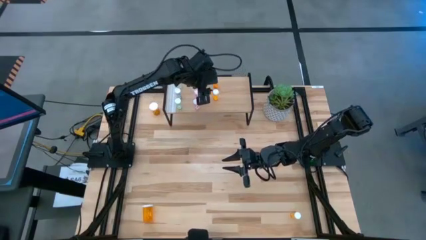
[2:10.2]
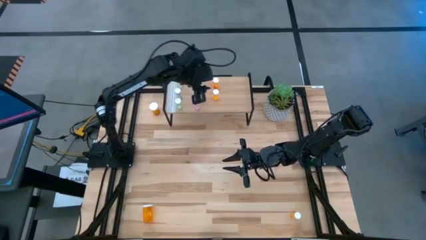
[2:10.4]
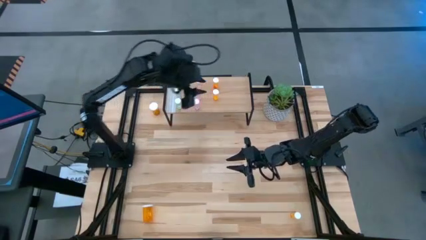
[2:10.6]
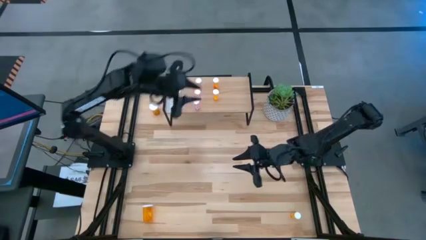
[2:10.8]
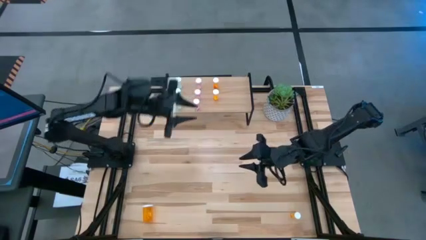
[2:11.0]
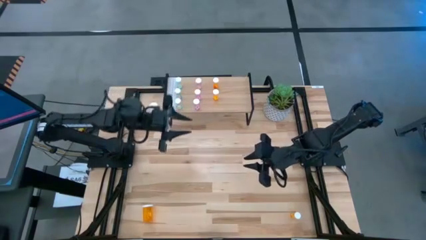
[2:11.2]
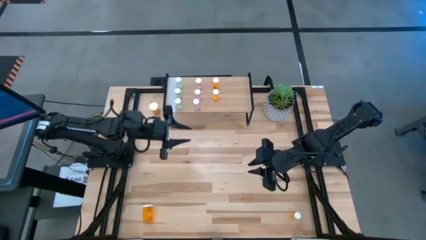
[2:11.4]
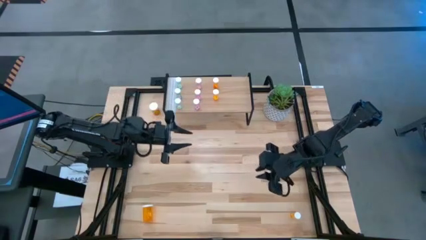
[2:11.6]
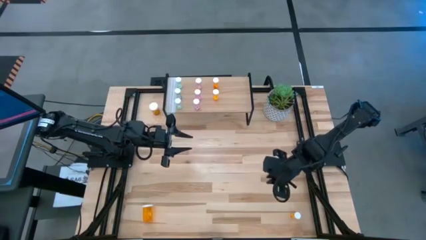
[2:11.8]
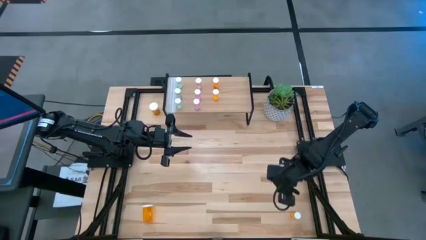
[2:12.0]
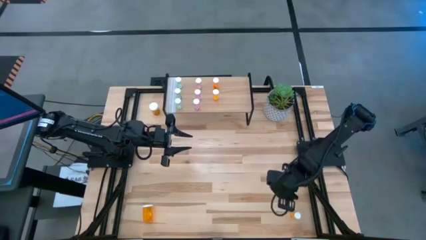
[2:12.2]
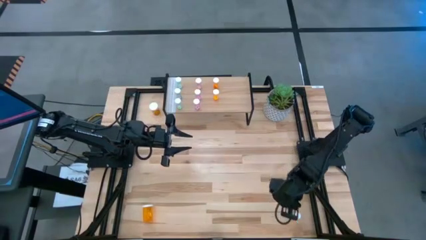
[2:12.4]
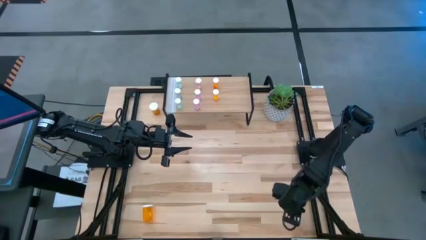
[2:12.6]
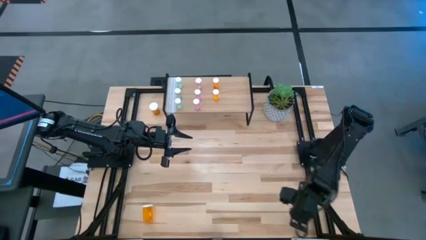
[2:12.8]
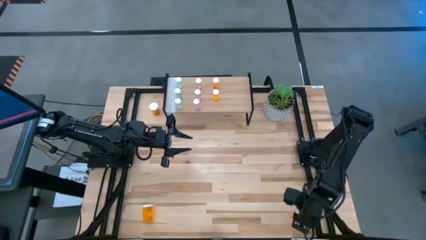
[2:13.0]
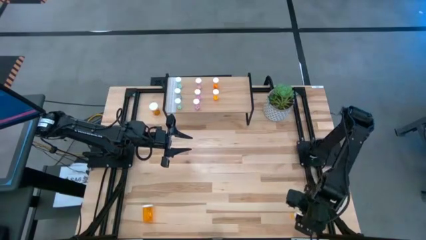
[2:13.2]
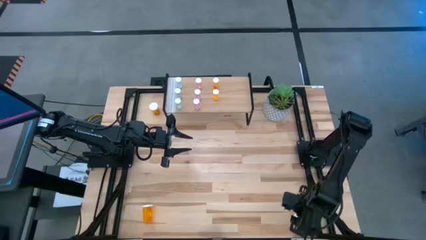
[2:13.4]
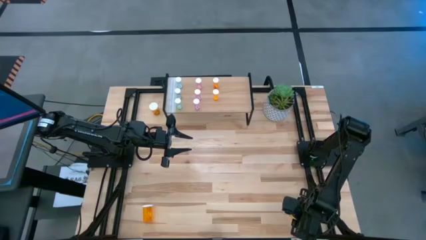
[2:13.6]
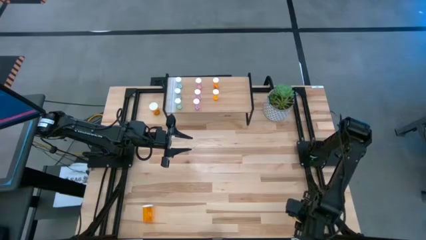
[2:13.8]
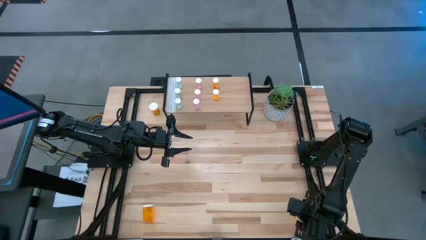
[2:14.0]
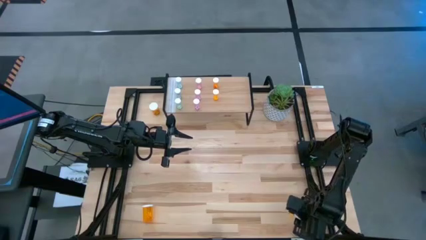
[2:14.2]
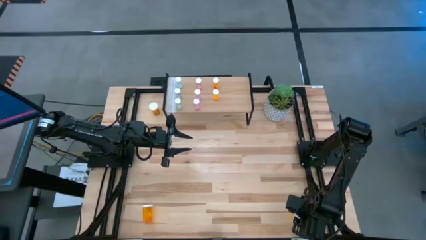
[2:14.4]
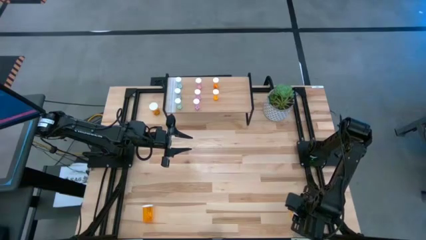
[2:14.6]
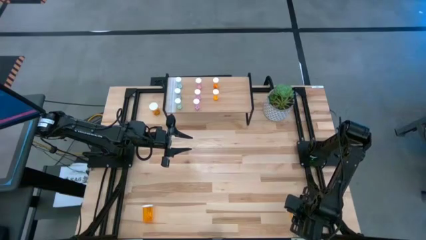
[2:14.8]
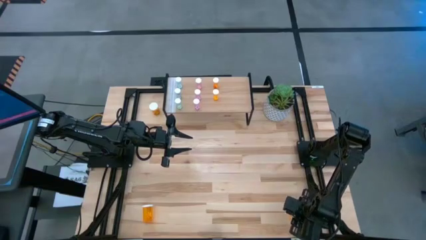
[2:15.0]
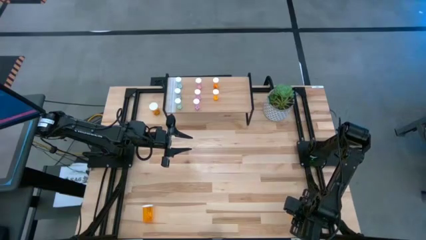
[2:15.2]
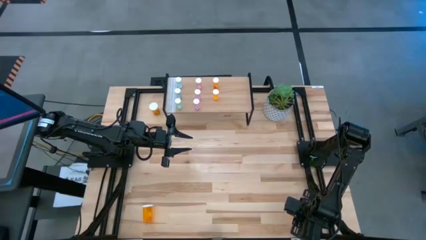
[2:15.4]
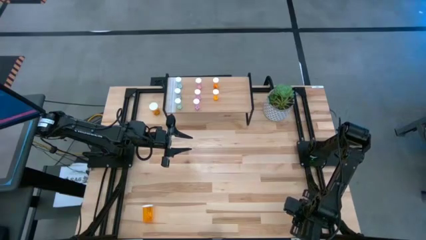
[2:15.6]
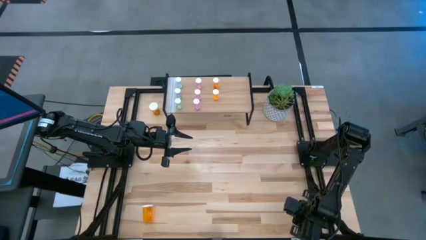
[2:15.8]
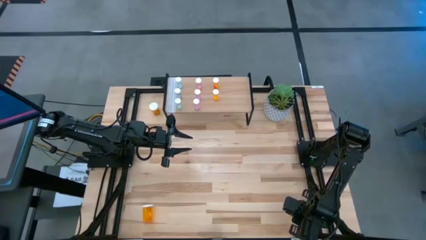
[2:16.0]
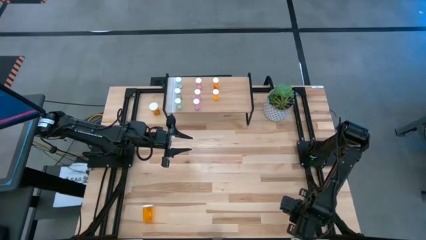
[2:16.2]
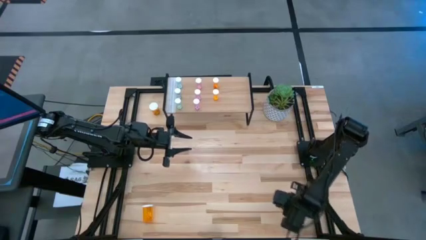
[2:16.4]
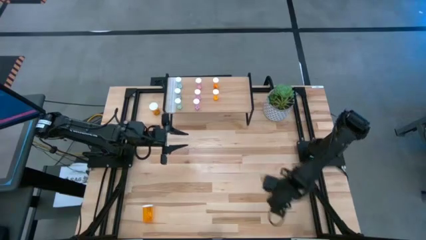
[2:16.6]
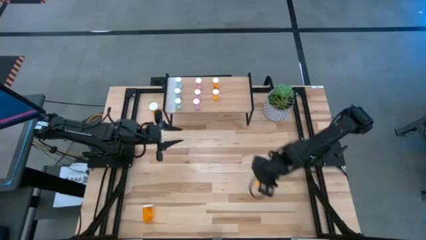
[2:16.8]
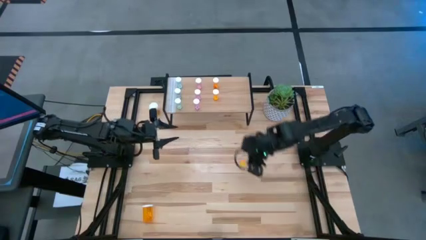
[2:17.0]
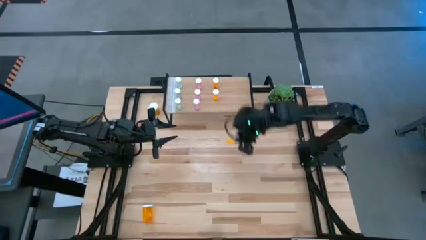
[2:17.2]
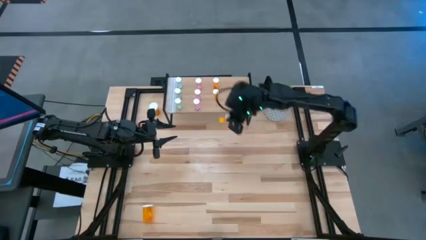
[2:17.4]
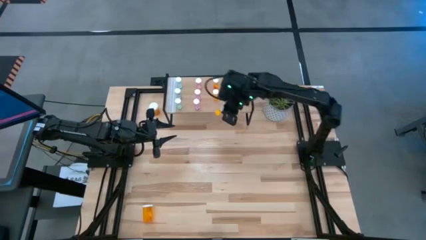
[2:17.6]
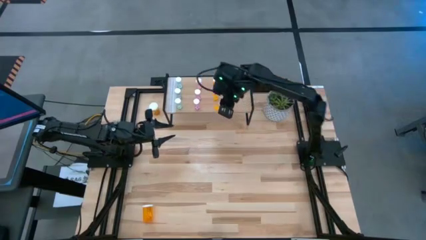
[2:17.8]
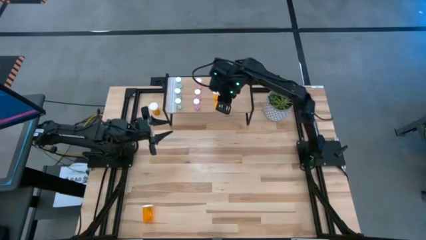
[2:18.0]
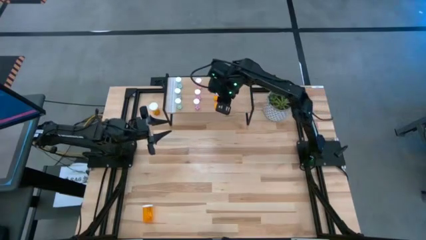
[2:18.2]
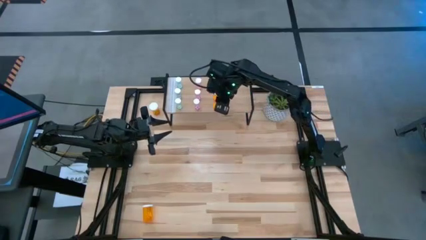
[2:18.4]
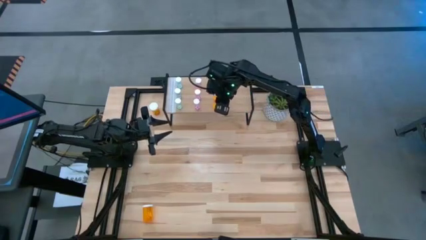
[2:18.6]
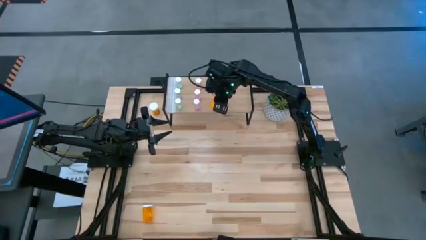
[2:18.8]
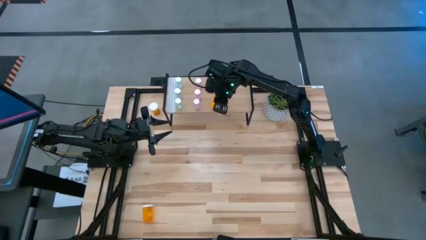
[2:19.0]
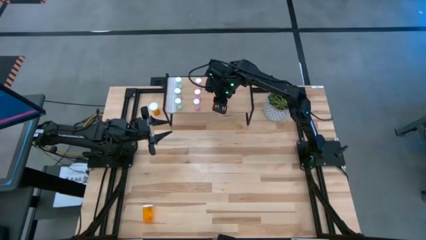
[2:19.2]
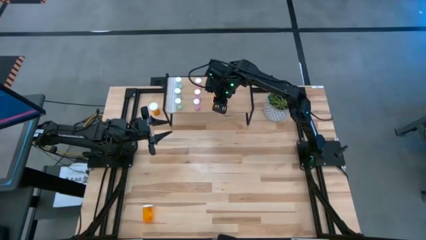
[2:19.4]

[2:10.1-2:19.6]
Task: Pick and place medicine bottles onto shelf by color
Put the small orange pill bottle on the shelf aligned with the other small orange pill bottles

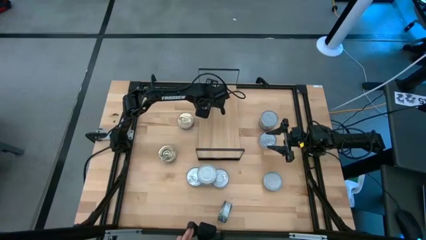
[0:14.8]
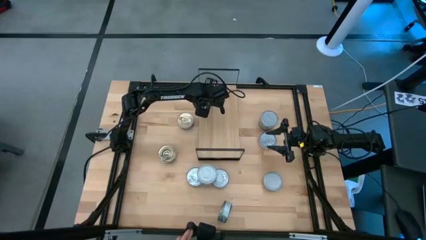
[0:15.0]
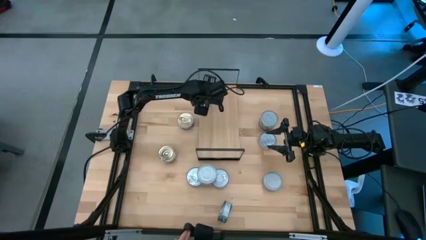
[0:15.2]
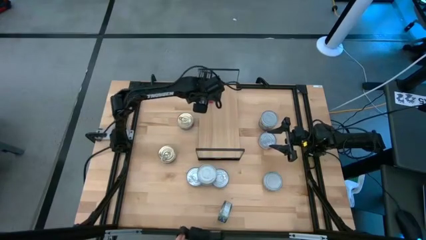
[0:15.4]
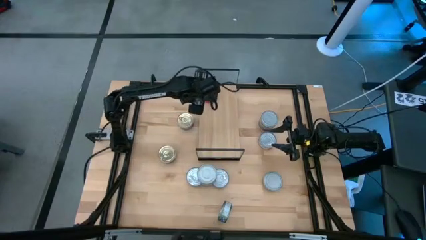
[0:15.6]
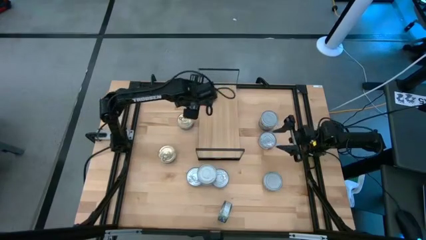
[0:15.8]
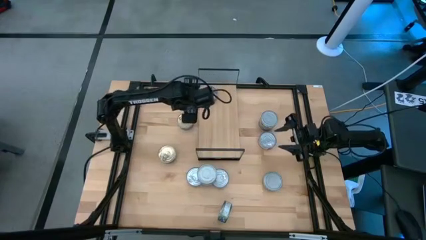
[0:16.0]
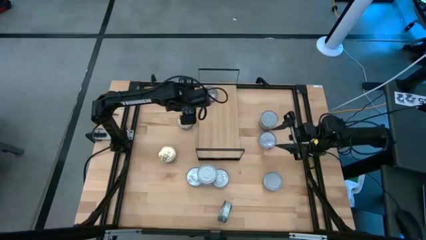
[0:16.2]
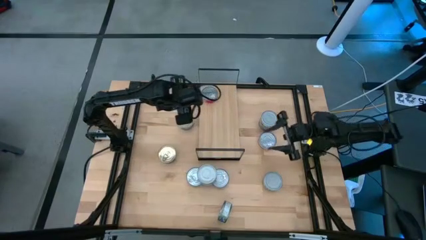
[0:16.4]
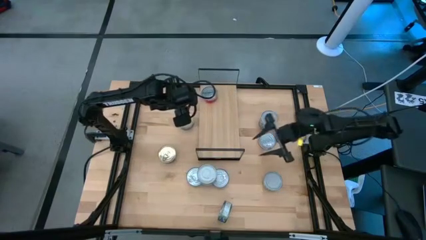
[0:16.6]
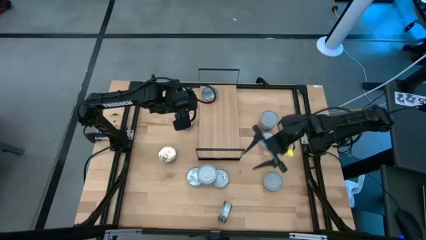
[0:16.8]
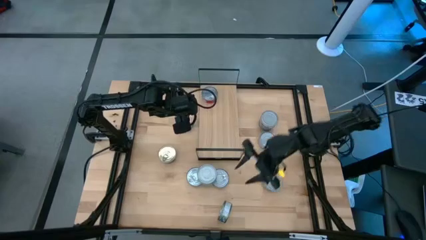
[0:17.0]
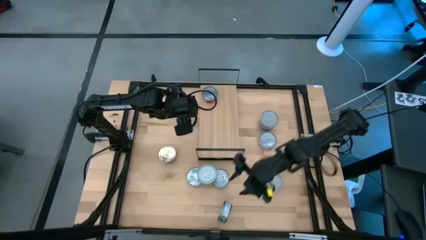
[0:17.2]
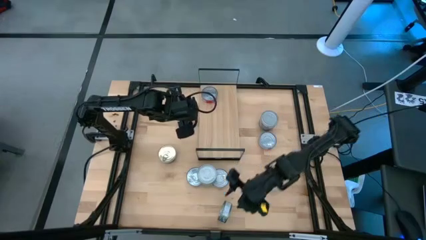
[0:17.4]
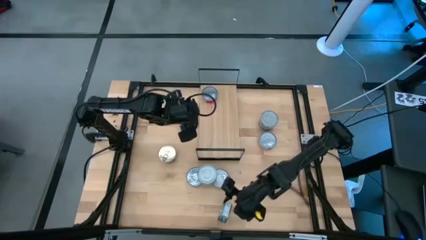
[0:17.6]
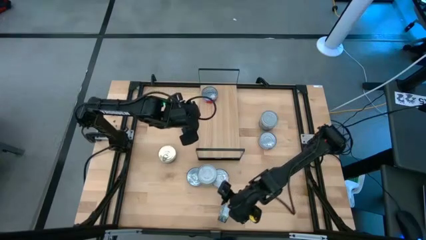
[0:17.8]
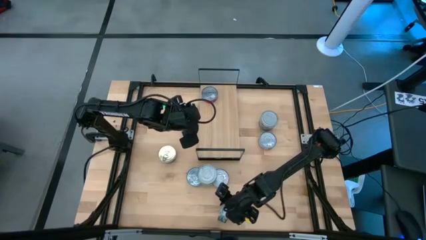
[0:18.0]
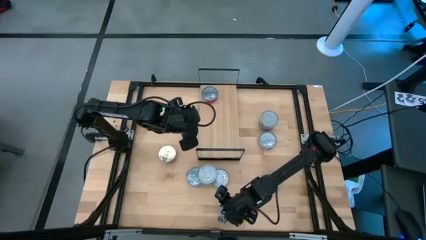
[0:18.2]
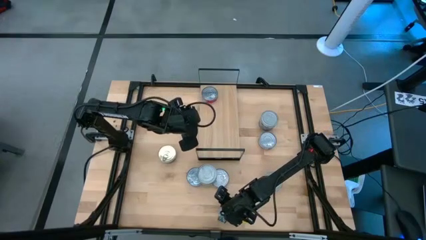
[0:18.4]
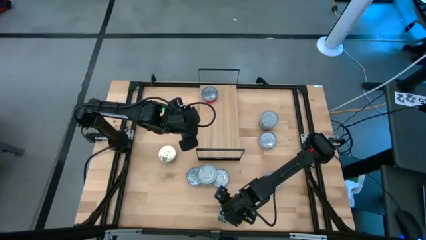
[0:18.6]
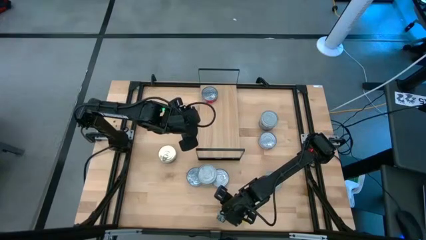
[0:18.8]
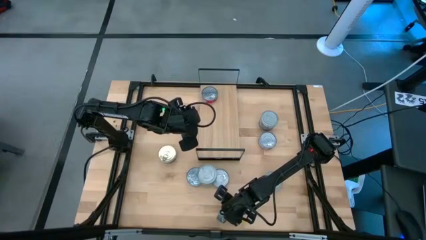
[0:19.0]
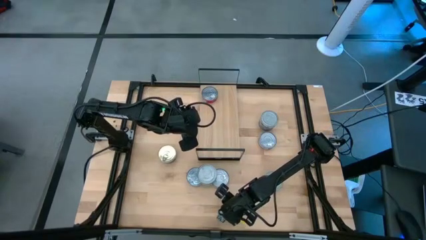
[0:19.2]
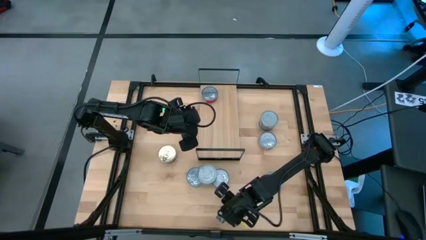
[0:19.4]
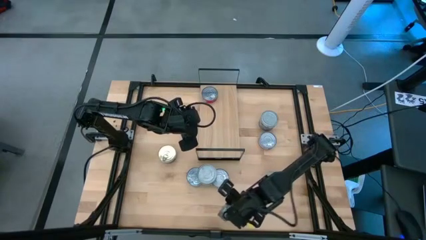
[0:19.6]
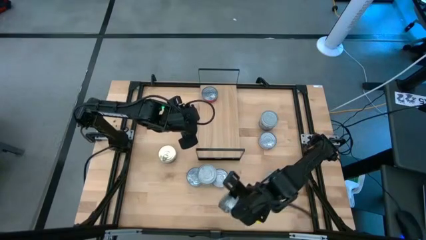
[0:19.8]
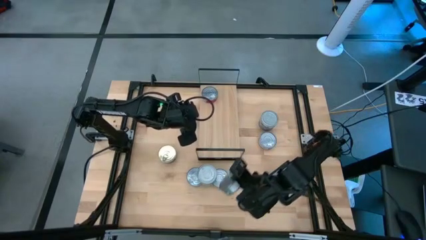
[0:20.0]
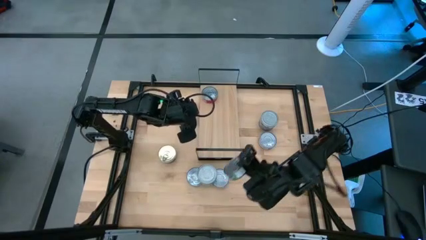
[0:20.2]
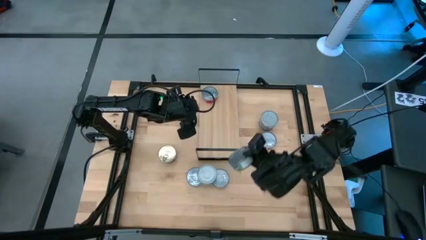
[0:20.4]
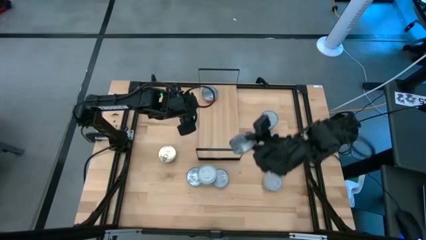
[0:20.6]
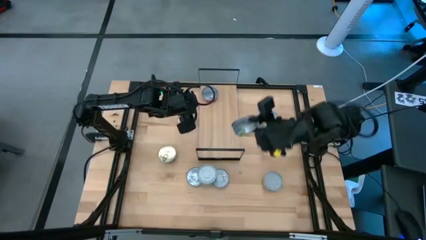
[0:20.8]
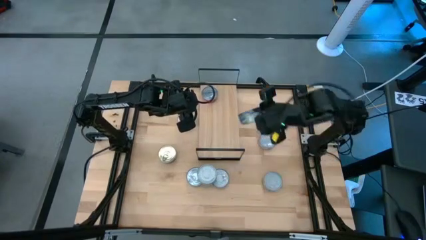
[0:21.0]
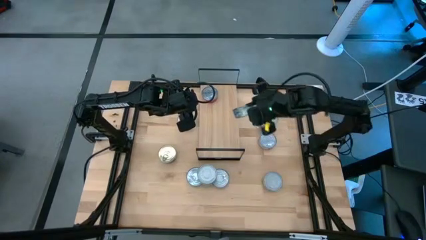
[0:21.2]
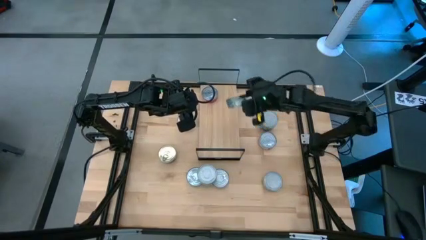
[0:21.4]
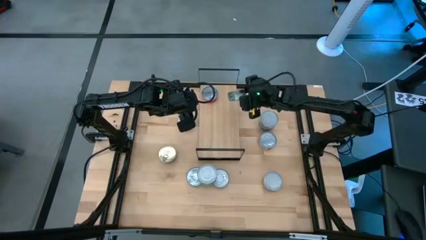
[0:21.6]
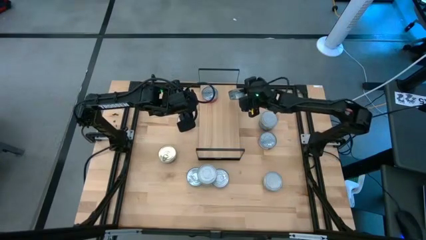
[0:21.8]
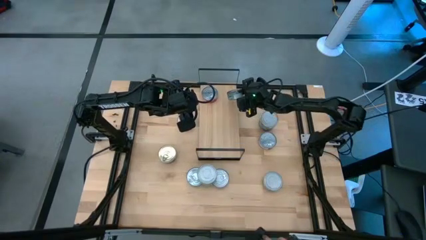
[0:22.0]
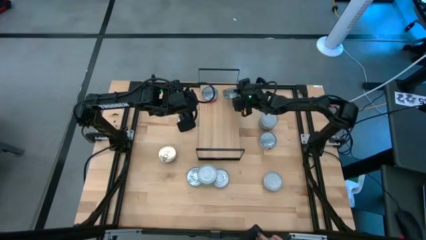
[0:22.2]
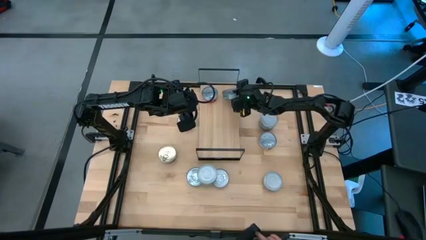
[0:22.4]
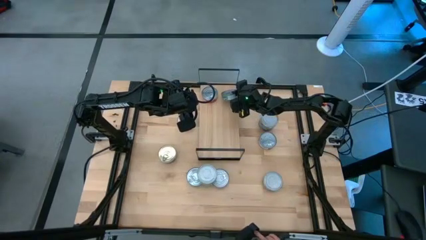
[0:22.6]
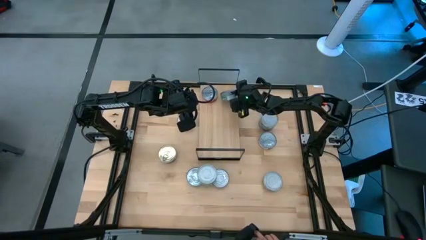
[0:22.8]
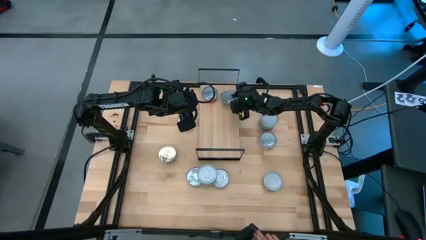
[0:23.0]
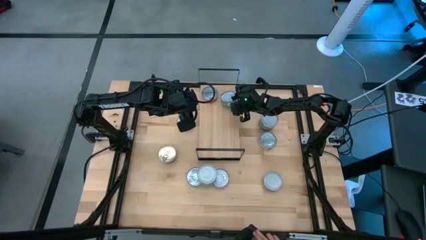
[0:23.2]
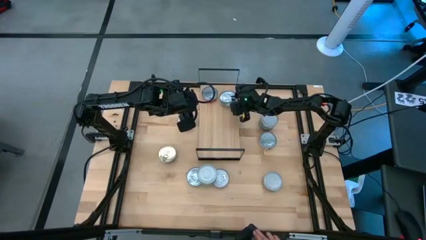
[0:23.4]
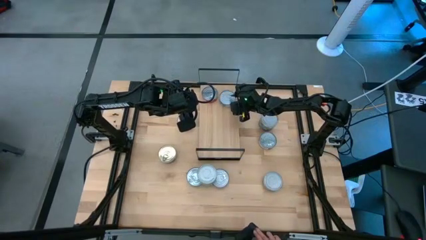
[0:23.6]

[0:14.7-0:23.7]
Task: Stack canned seafood by type on shelf
Put the green tuna can on the shelf
